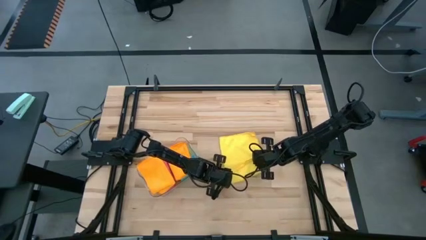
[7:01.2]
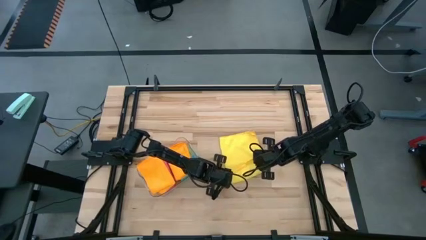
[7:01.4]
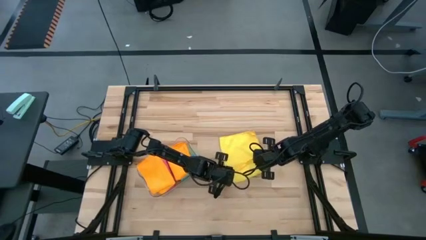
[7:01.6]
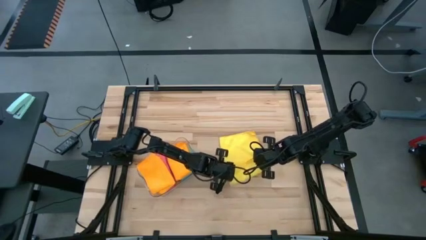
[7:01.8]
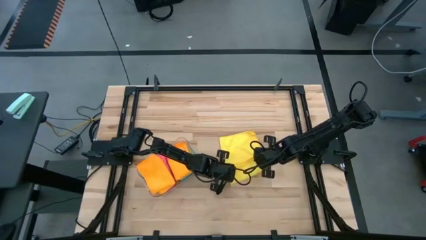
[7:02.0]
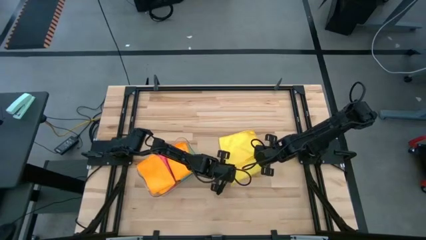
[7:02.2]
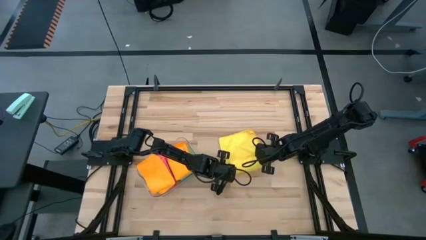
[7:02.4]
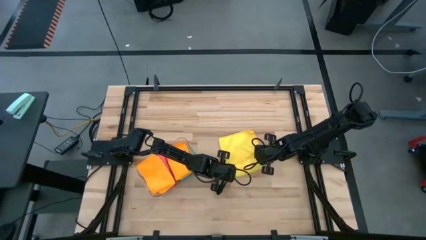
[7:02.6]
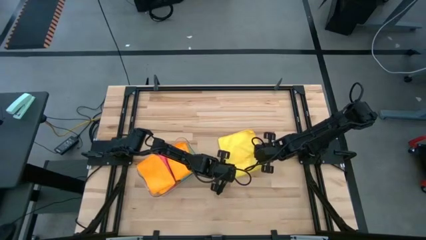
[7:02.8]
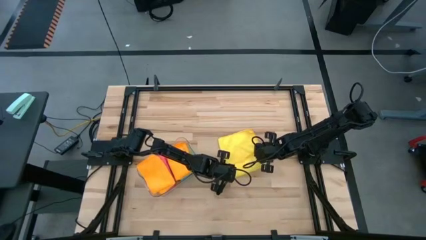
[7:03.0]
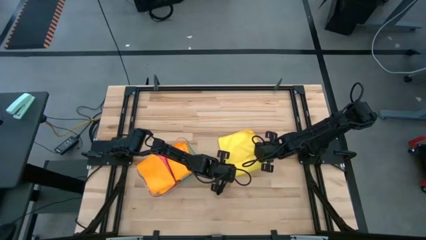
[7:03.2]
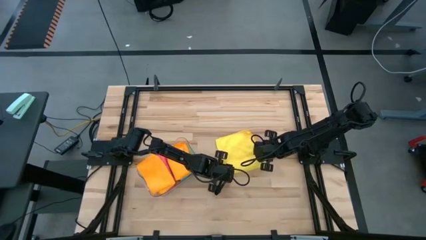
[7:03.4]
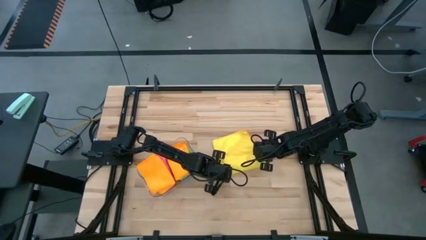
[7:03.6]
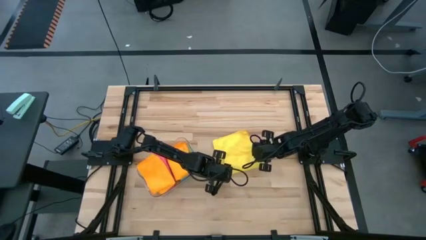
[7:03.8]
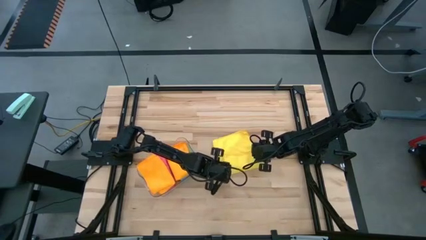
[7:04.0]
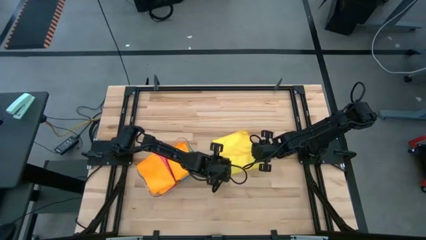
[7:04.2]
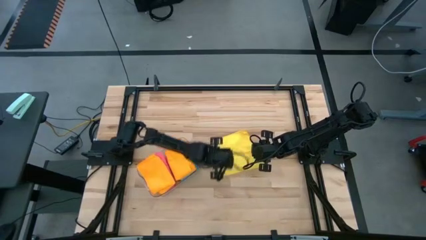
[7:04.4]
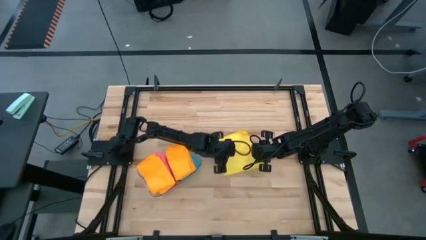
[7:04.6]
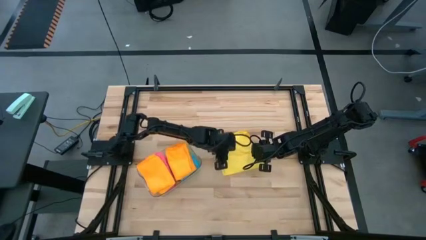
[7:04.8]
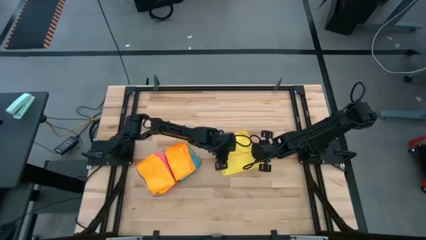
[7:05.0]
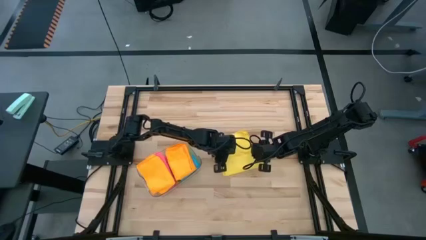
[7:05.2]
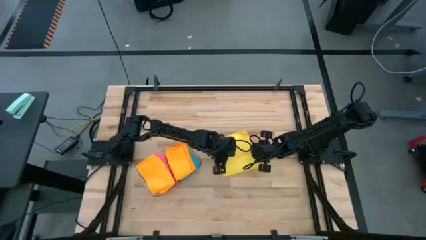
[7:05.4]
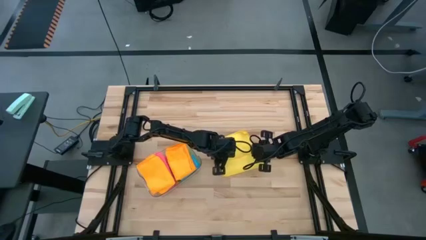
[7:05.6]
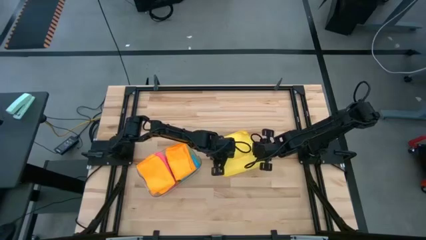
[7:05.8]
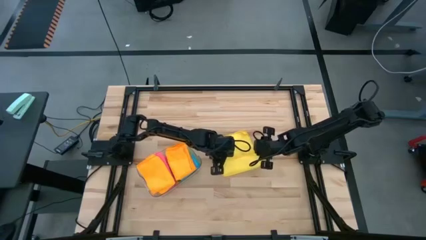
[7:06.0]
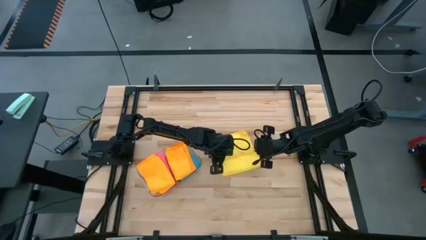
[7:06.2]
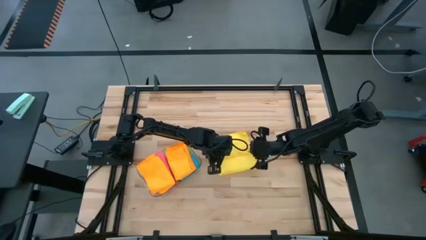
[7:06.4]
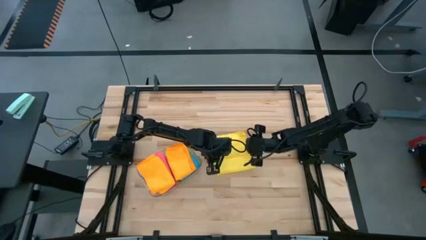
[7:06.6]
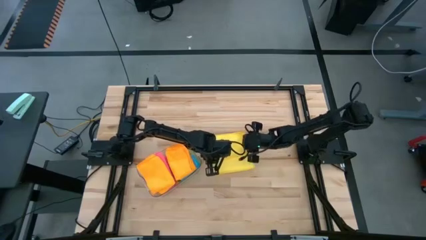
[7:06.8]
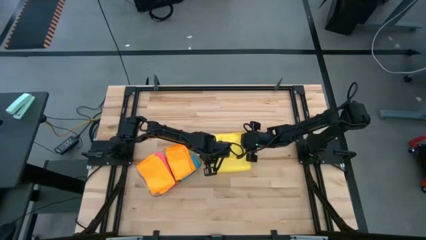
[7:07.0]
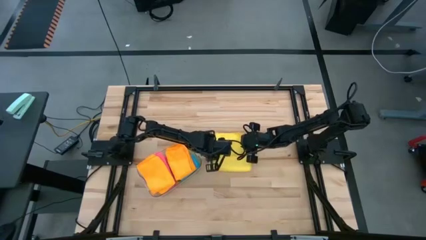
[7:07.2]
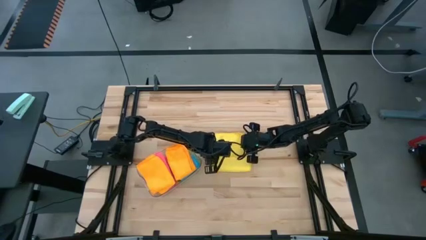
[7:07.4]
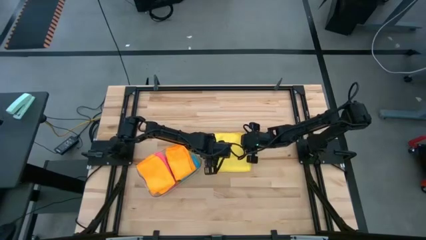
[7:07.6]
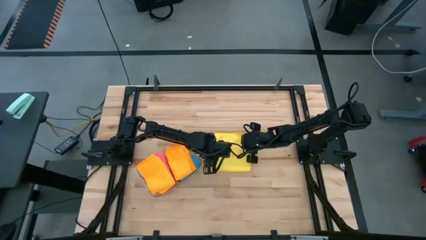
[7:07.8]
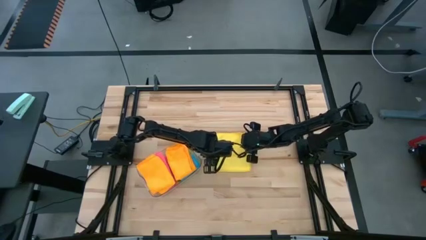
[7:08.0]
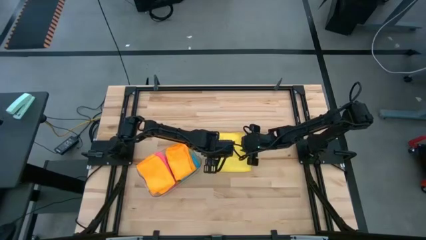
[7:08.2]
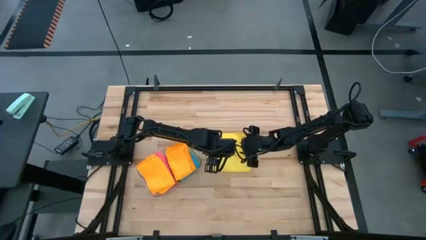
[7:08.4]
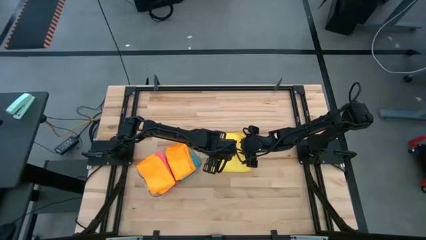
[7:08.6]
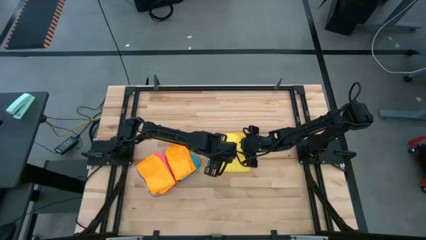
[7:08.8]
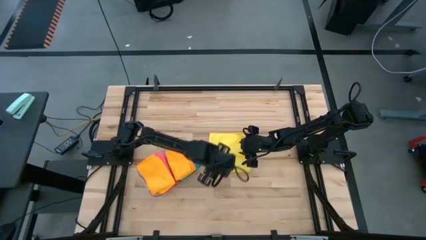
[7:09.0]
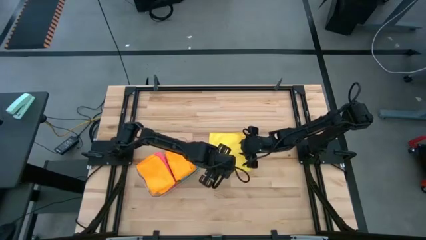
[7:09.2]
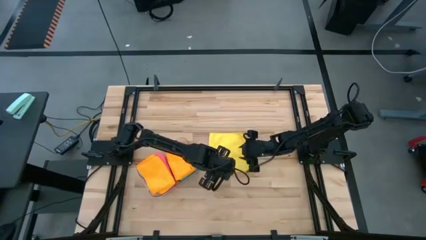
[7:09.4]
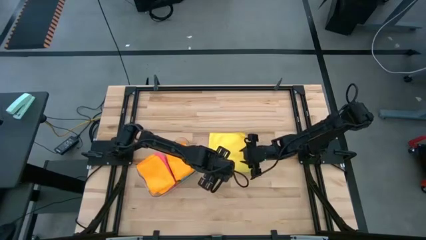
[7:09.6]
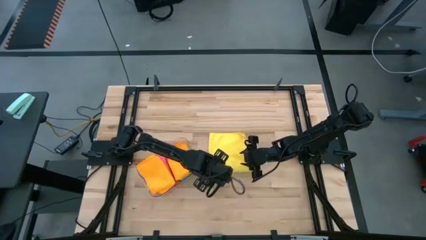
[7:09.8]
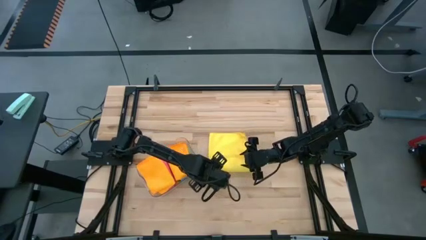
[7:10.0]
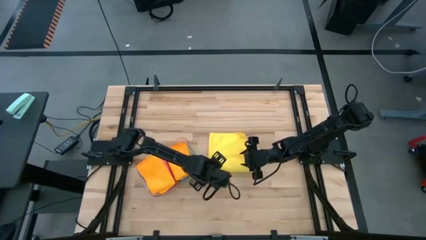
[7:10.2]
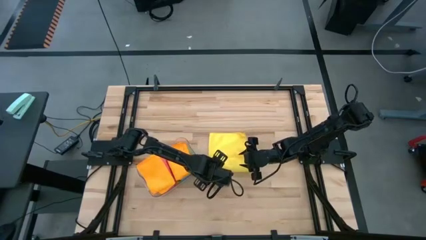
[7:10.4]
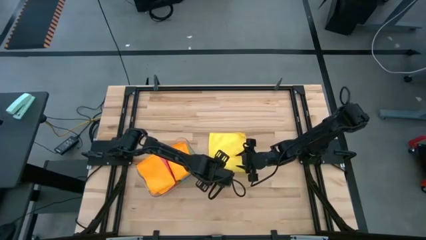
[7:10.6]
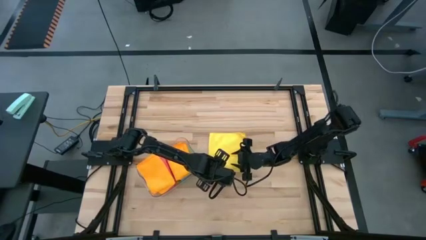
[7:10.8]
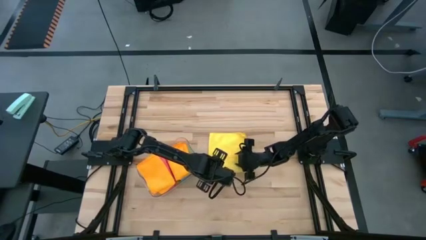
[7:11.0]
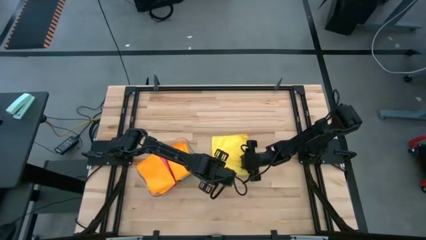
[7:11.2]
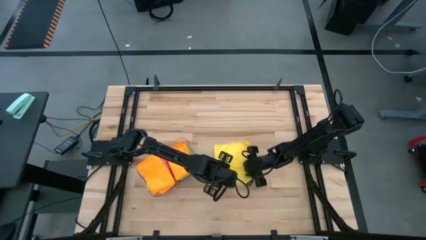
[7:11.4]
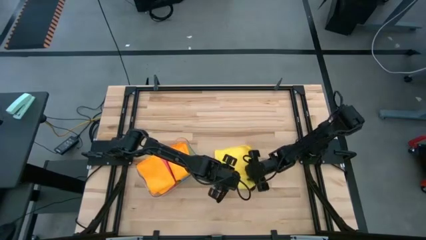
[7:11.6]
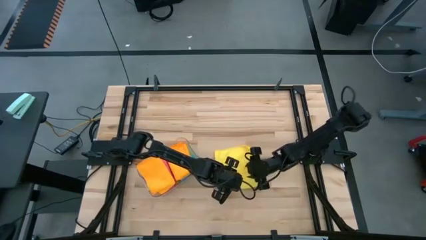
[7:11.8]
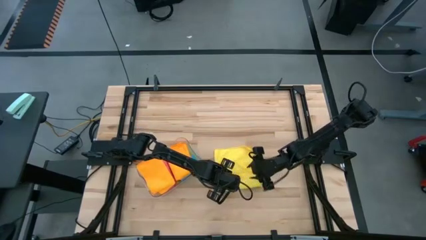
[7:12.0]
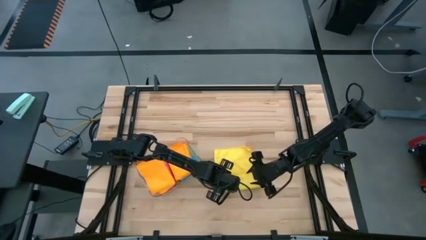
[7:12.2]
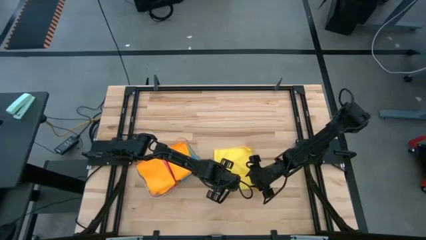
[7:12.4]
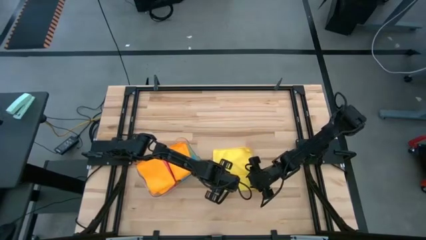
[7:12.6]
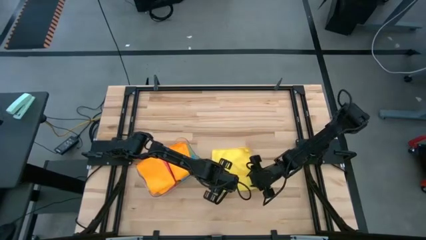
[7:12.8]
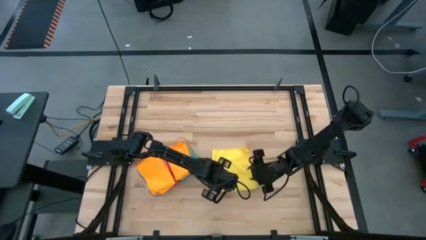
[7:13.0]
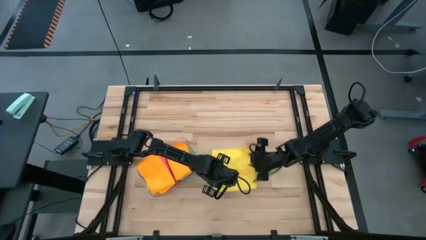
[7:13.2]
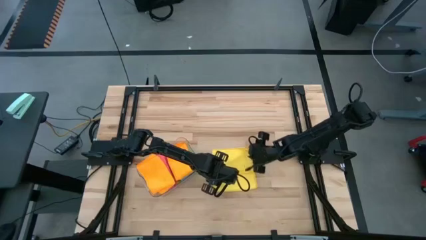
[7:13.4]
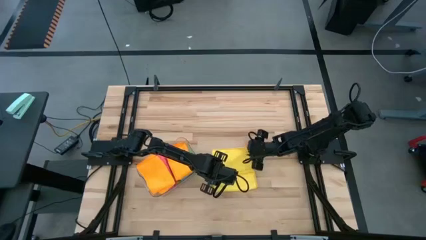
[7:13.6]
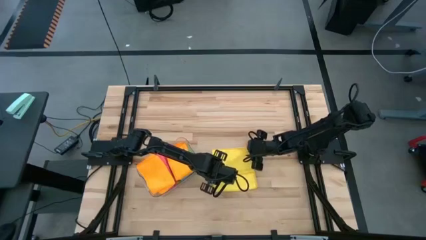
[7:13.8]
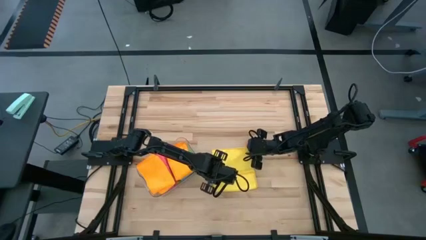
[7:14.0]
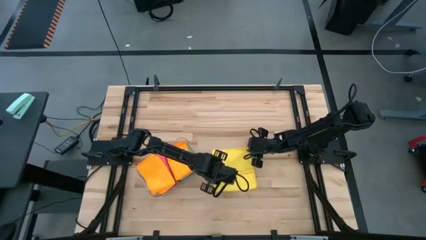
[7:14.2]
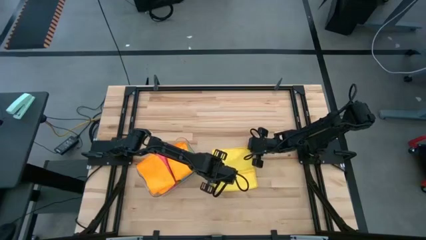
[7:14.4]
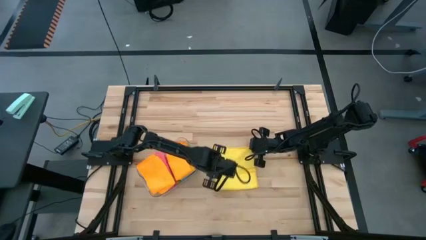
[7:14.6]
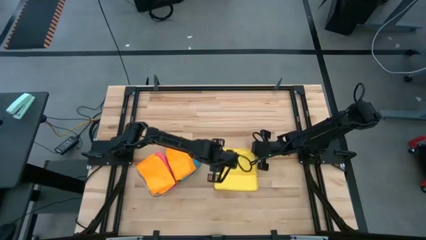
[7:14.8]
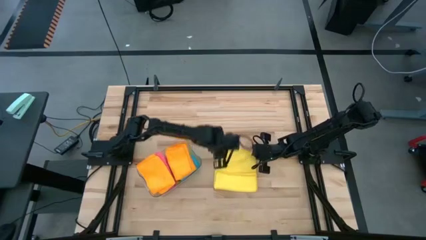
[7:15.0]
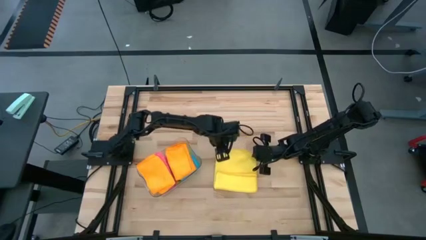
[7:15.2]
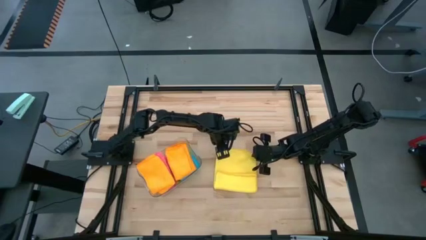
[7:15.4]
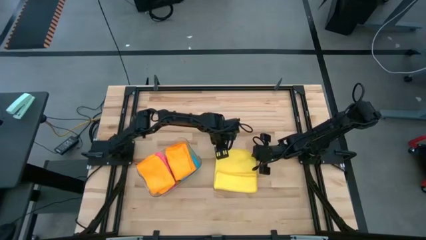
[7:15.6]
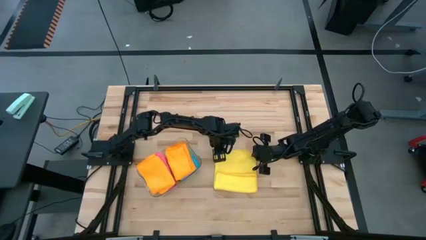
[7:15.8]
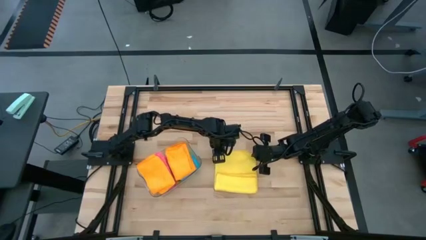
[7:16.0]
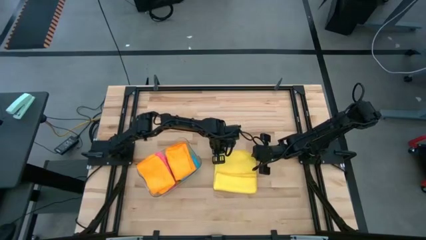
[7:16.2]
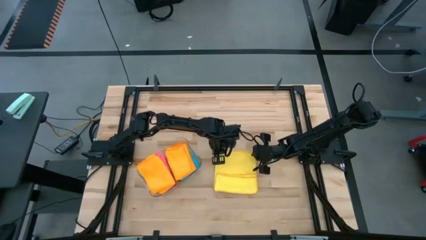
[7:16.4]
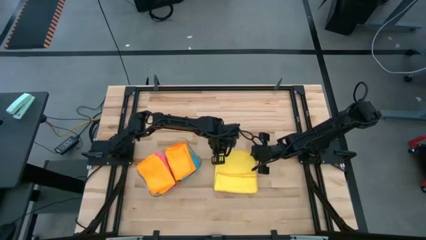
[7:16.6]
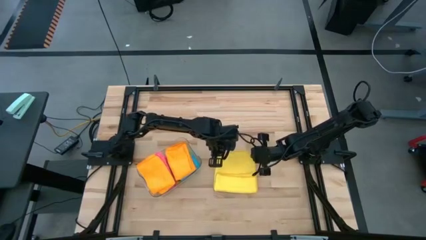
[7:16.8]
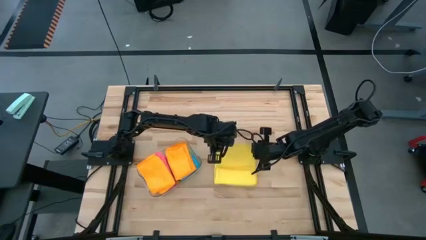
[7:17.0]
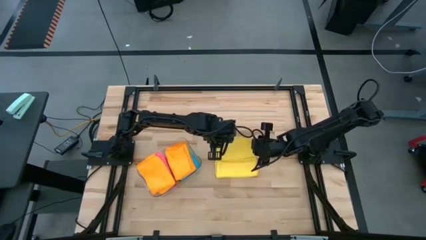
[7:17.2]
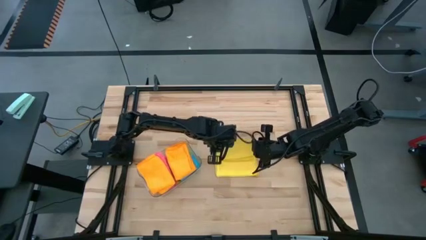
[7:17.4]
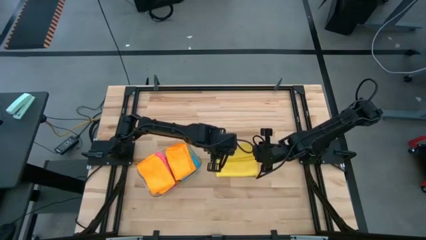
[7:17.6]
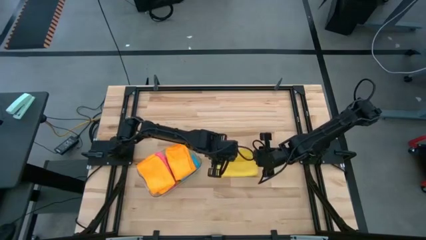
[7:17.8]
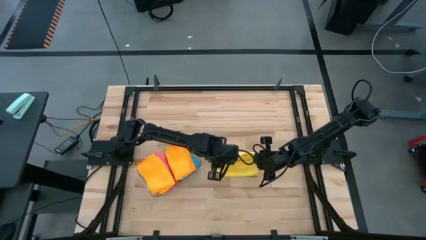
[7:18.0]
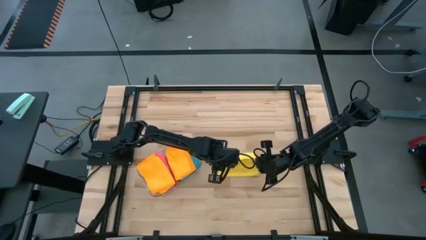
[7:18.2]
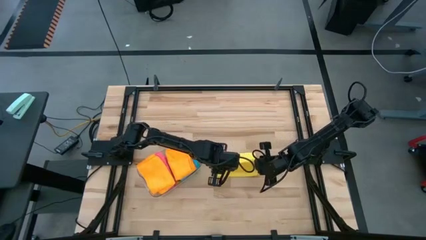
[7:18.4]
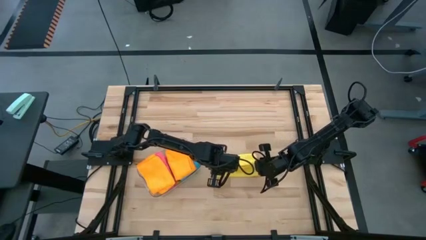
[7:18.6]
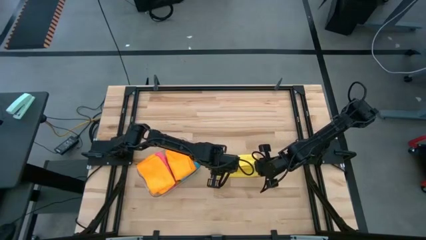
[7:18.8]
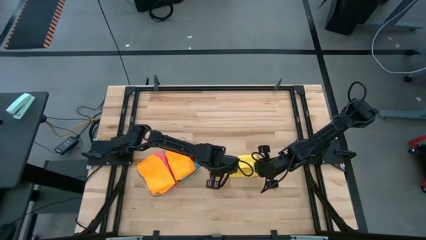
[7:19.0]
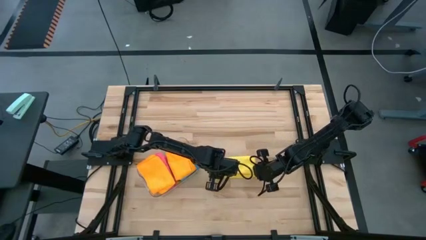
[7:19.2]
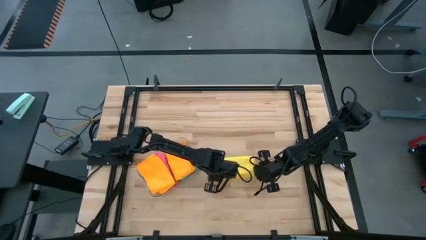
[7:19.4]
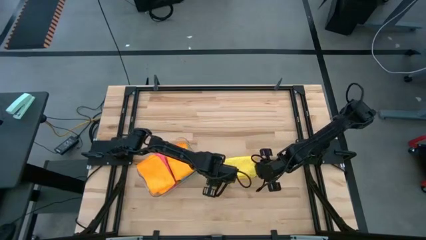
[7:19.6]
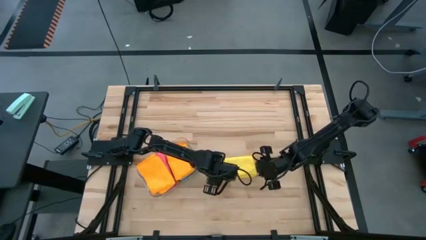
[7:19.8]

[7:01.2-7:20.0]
Task: Fold microfiber towels
Fold the yellow microfiber cloth
